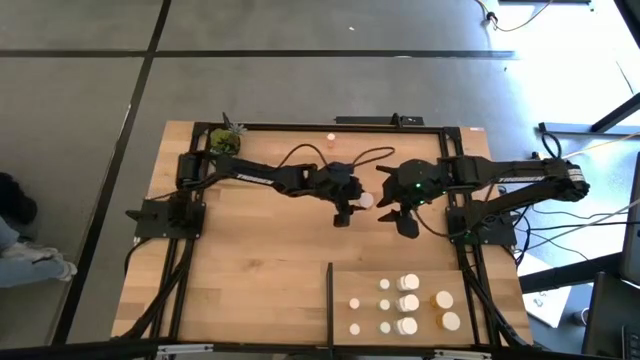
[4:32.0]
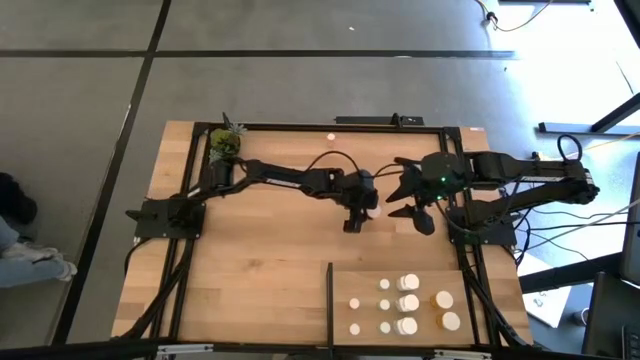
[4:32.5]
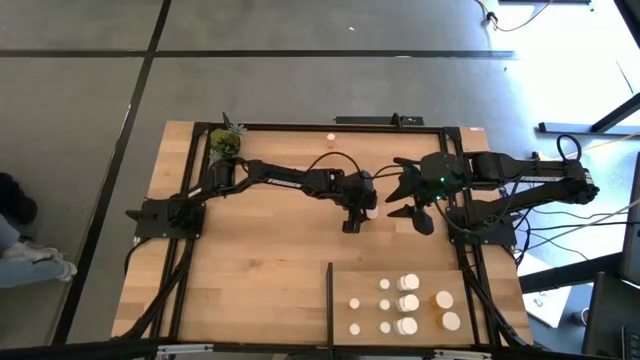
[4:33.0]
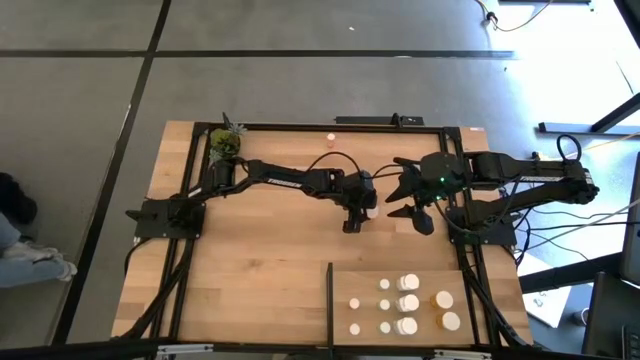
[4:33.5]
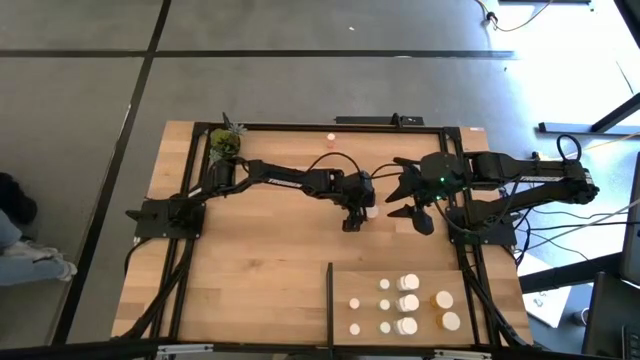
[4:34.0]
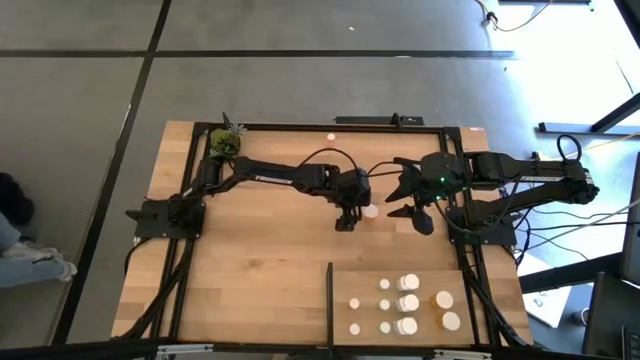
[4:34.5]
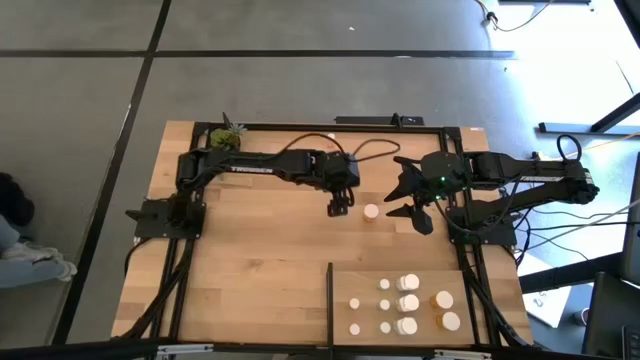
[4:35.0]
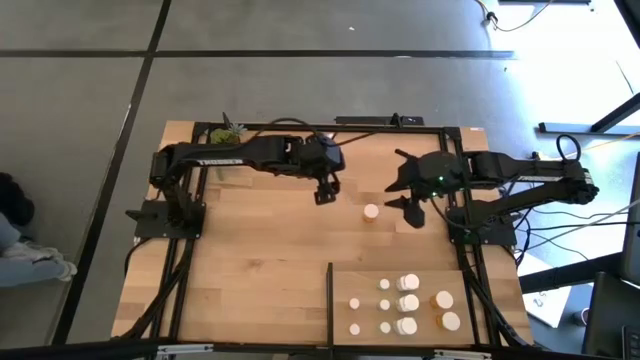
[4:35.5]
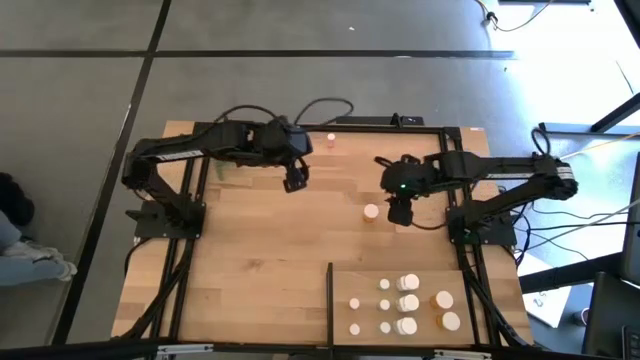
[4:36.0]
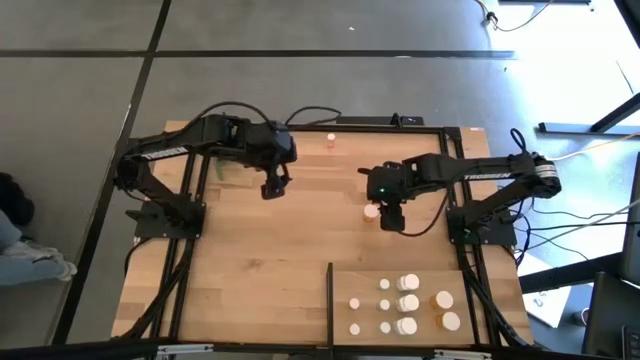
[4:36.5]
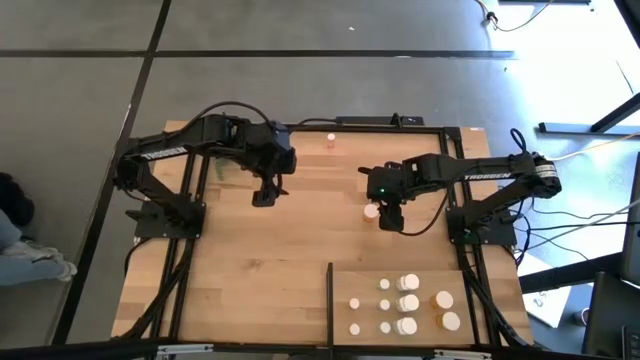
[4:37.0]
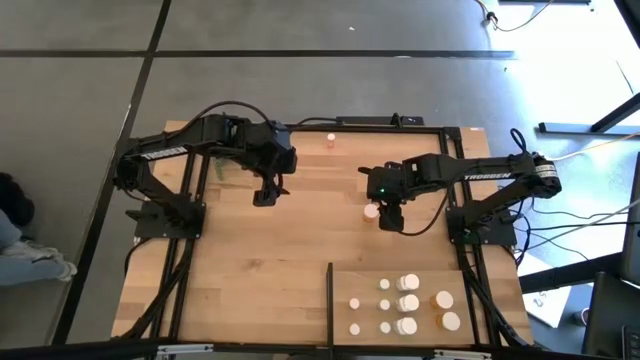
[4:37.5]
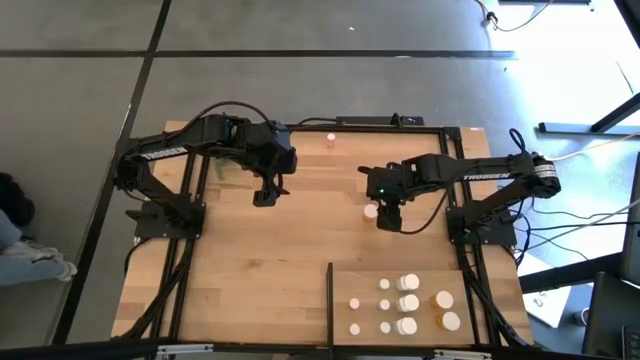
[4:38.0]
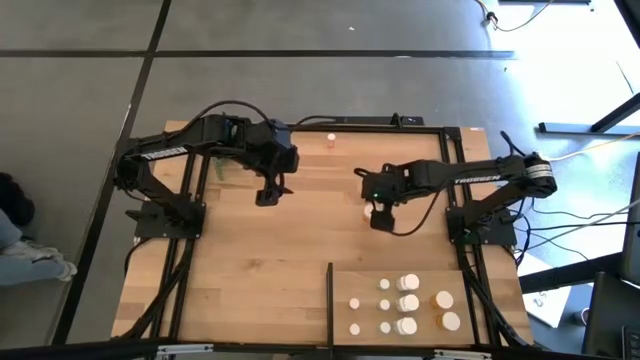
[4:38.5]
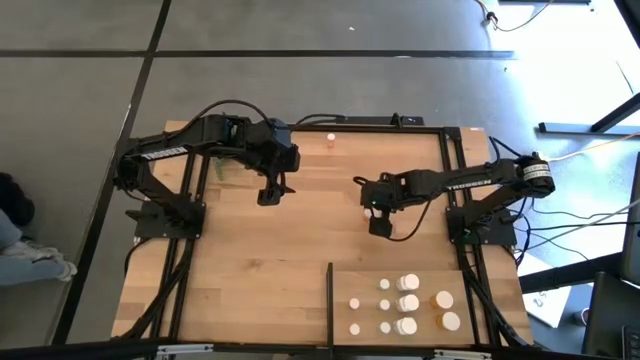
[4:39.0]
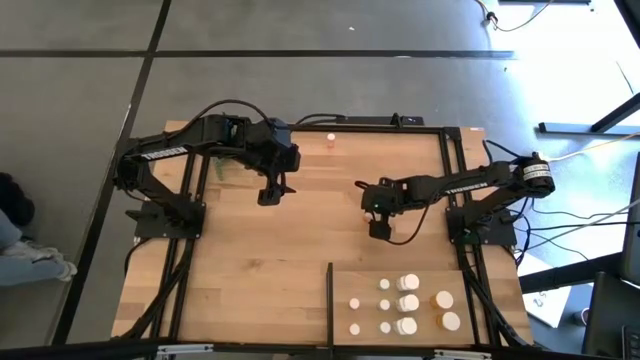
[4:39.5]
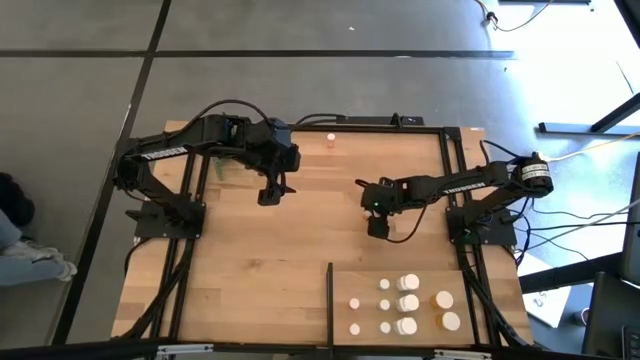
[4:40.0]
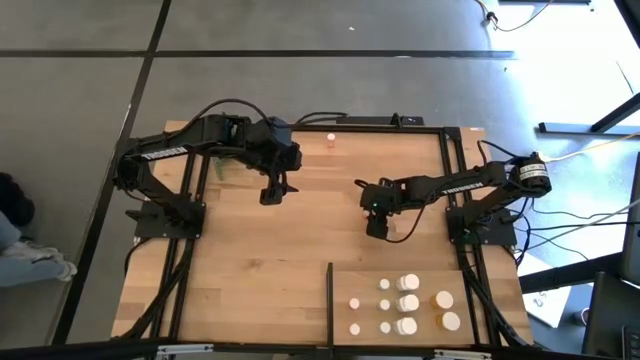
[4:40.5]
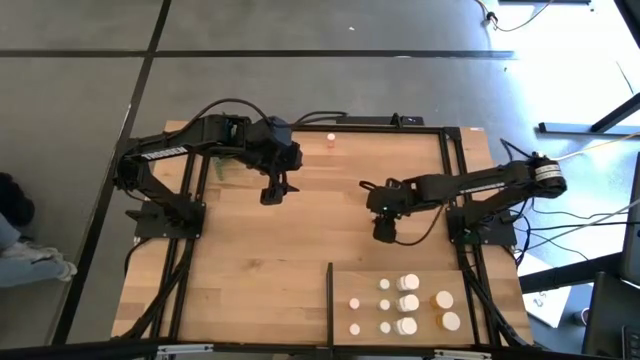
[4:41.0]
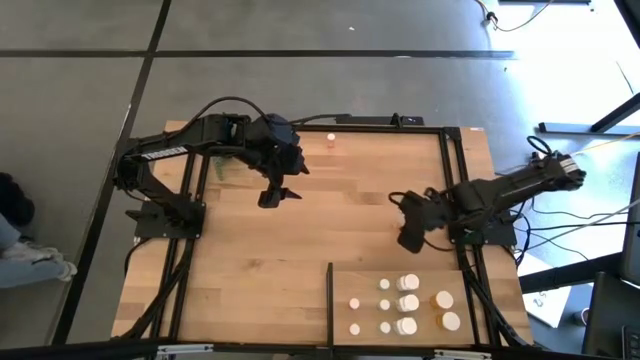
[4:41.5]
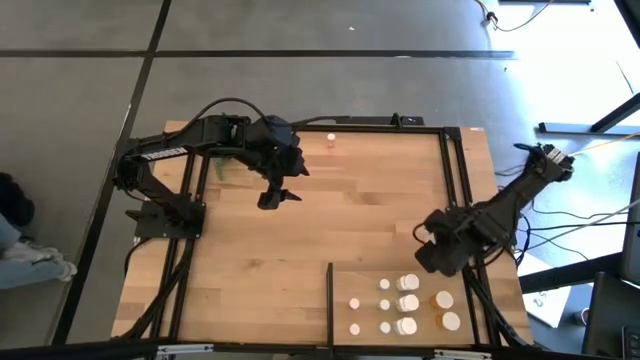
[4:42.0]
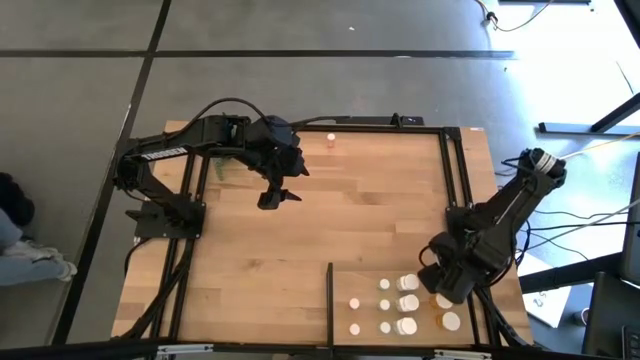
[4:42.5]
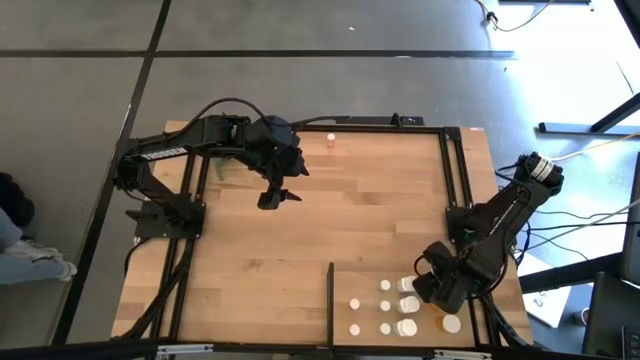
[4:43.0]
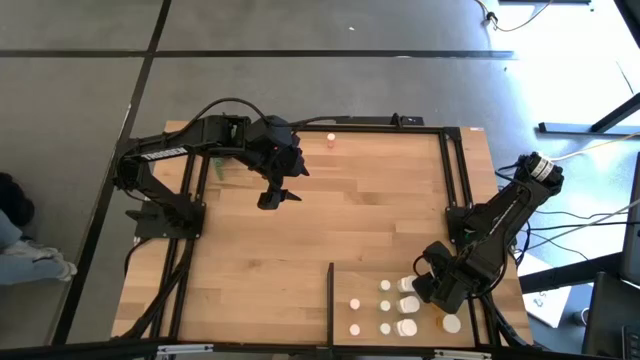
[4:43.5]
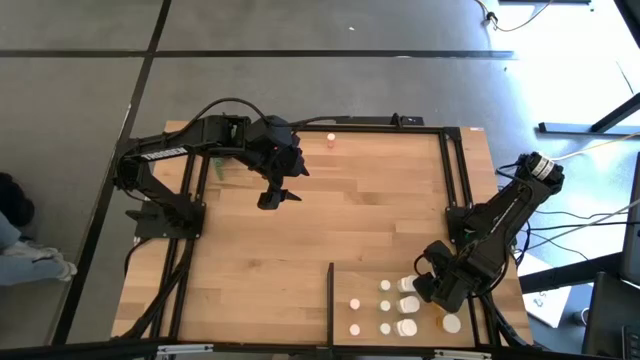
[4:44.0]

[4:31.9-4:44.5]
Task: Pick and place medicine bottles onto shelf by color
Put the orange pill bottle on the shelf aligned with the other orange pill bottles

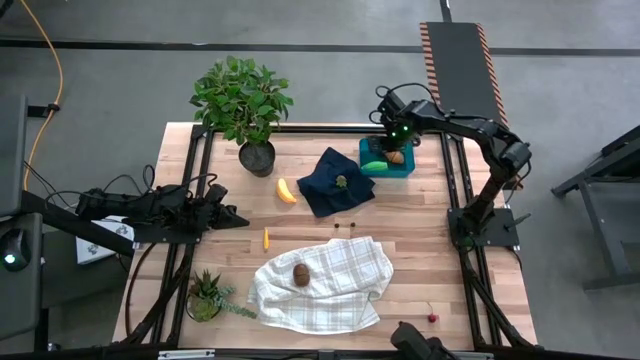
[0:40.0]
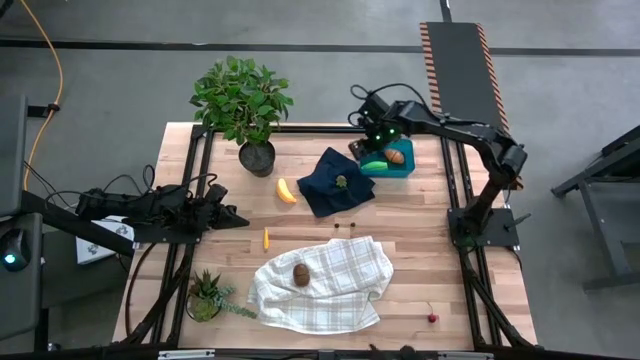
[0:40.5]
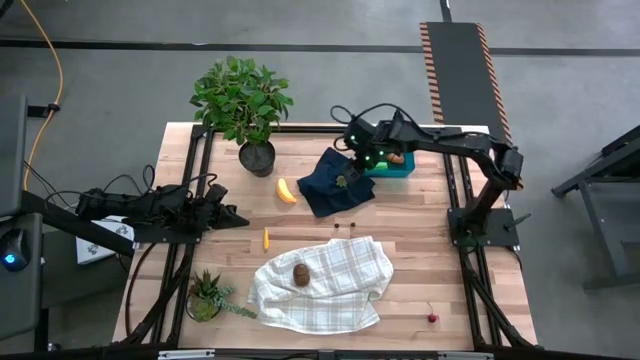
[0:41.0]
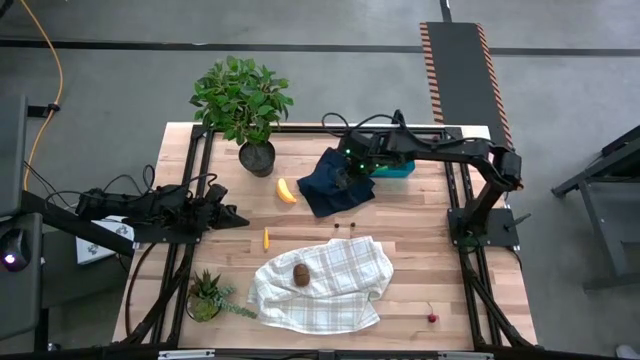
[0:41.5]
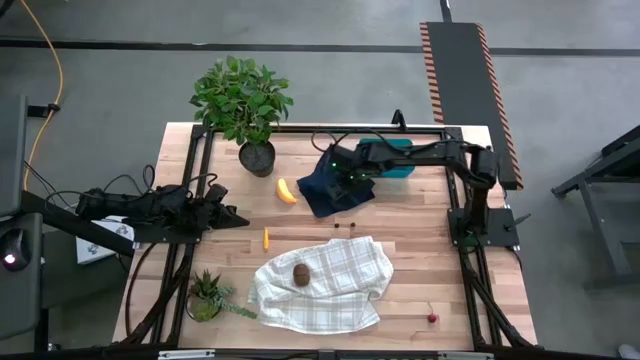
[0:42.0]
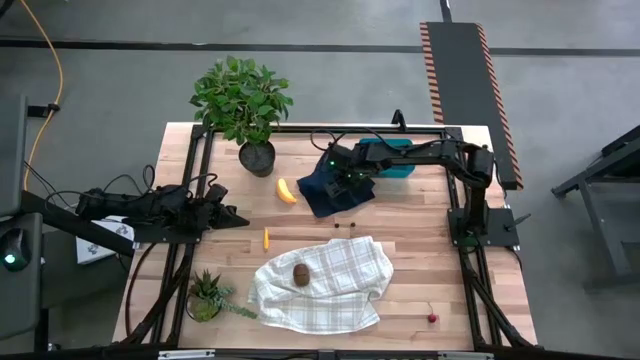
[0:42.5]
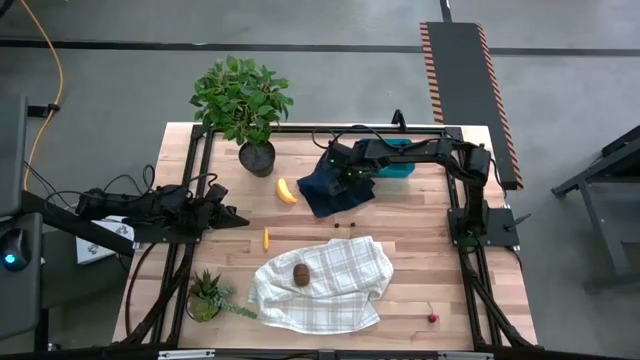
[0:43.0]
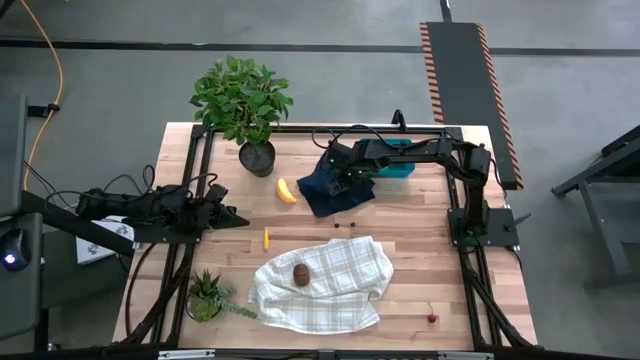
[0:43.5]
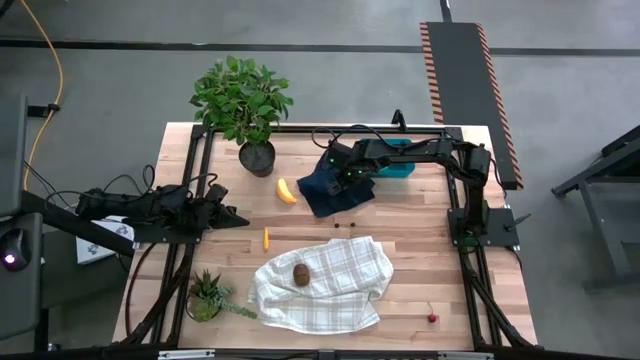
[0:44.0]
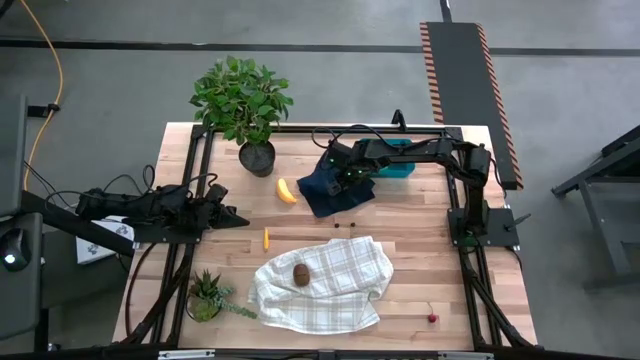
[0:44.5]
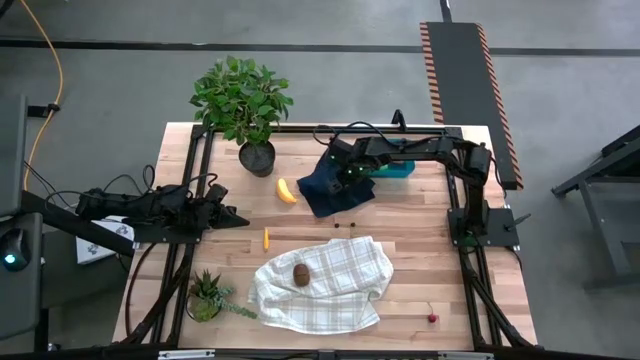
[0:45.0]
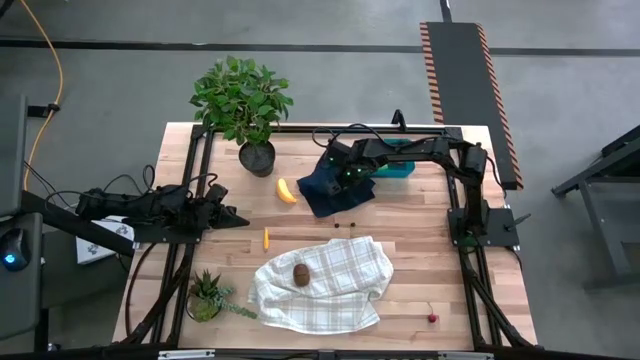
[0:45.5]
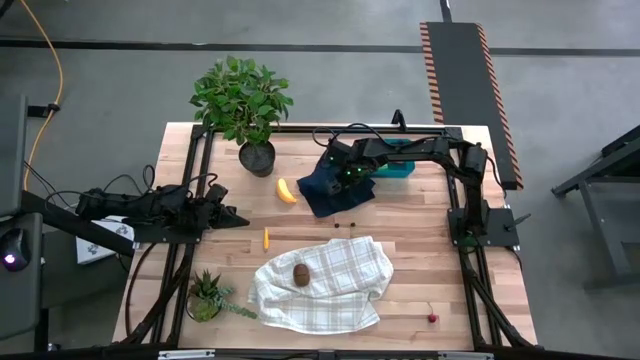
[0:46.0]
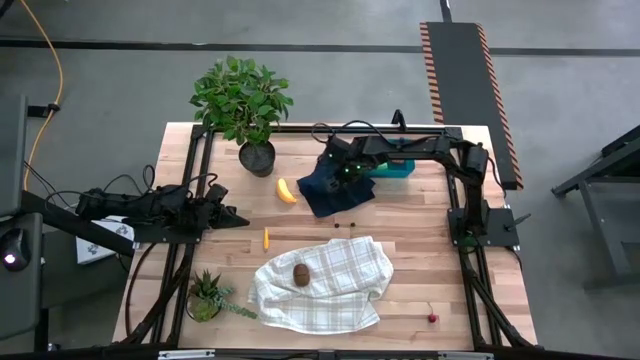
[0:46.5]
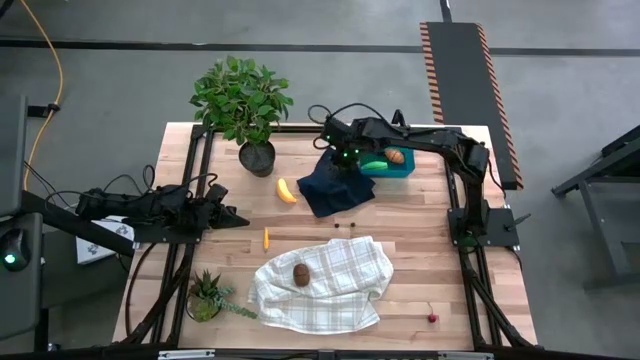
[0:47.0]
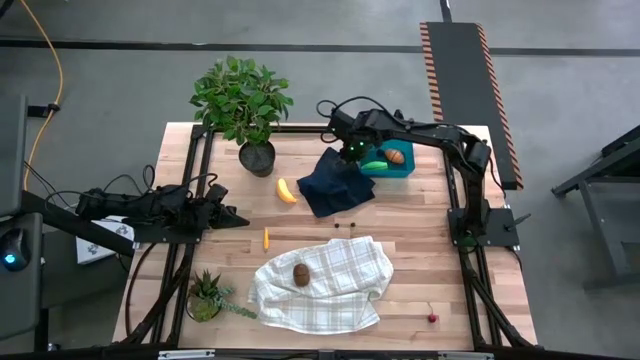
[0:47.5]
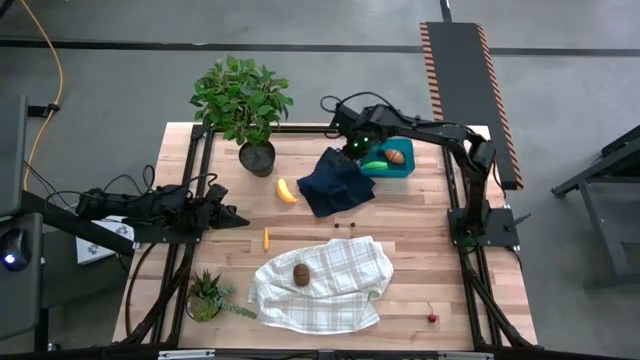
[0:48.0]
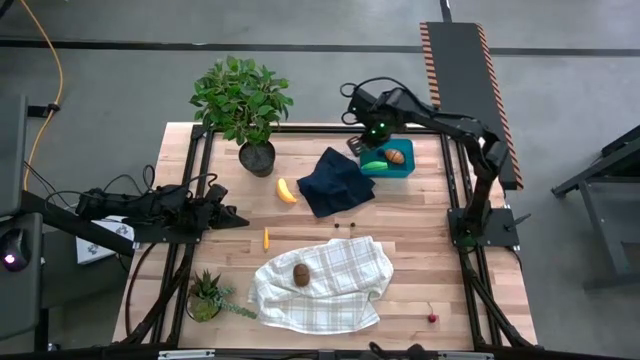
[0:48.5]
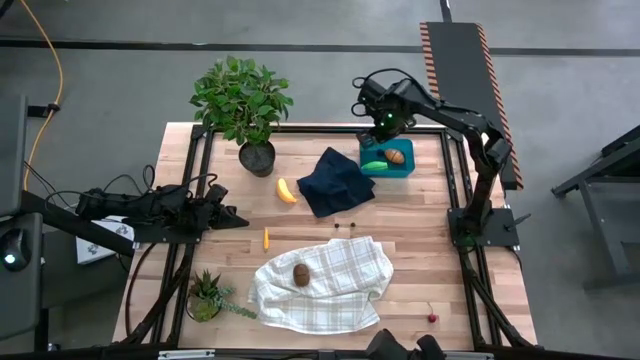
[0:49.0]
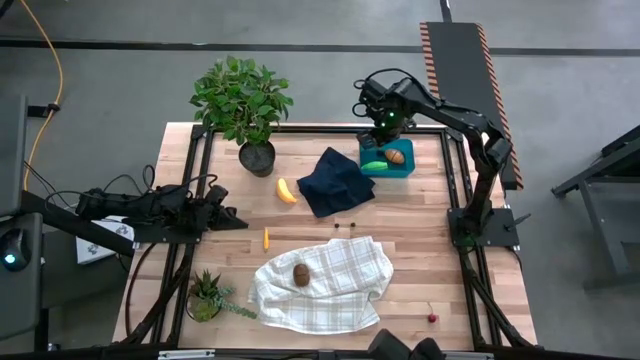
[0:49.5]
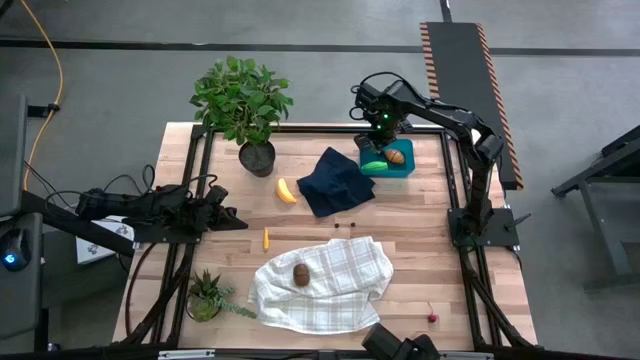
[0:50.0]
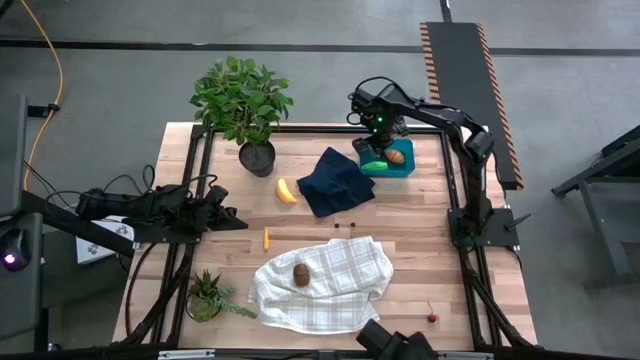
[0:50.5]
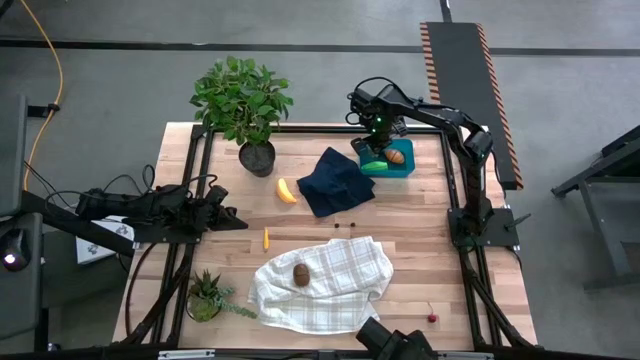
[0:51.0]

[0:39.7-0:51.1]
Task: Pick and placing Produce into tupperware
Put the red strawberry into the blue bin
